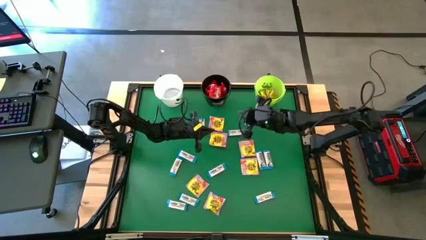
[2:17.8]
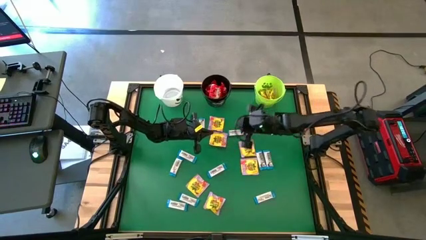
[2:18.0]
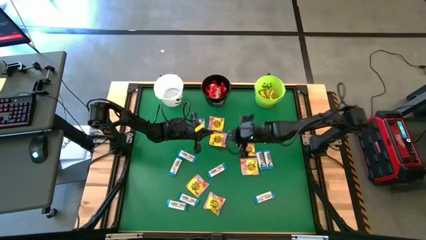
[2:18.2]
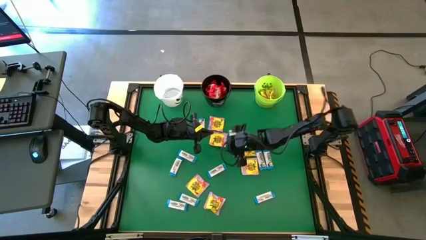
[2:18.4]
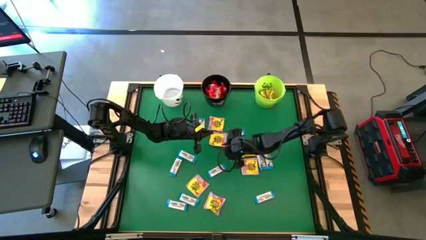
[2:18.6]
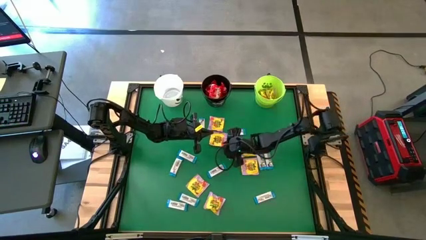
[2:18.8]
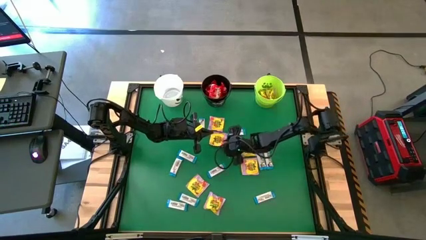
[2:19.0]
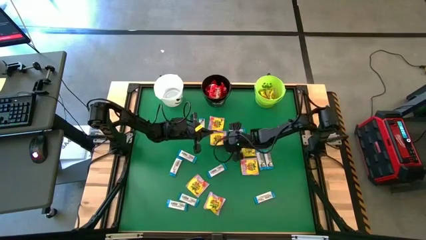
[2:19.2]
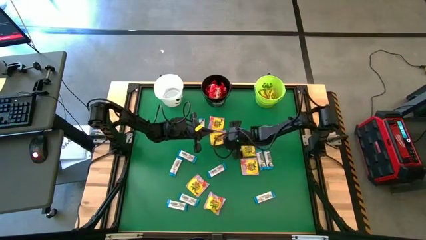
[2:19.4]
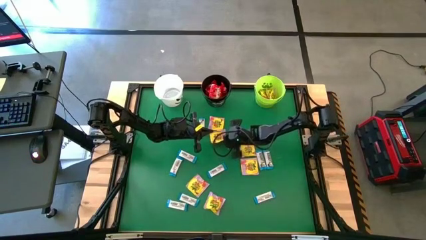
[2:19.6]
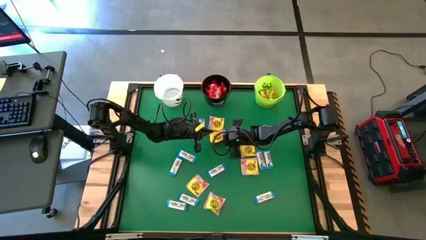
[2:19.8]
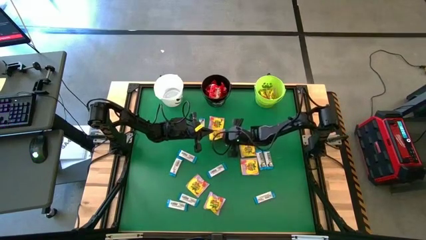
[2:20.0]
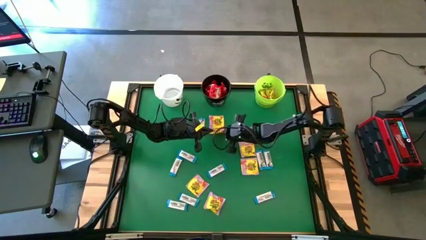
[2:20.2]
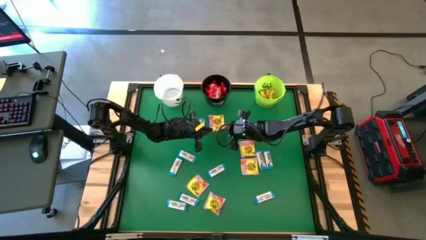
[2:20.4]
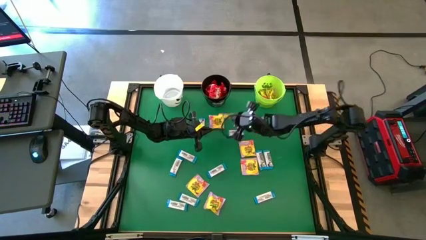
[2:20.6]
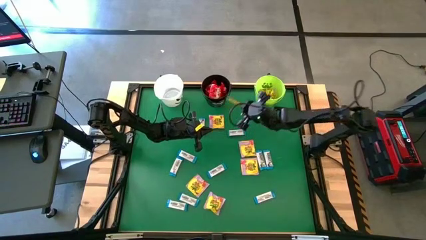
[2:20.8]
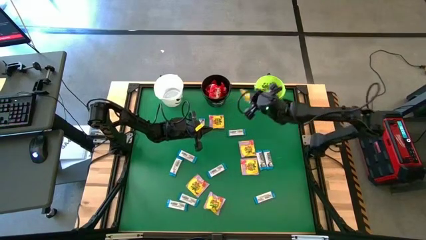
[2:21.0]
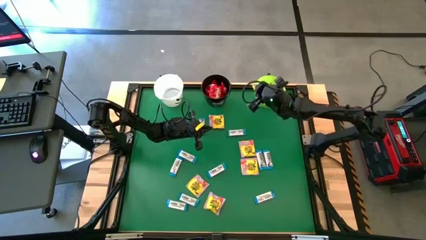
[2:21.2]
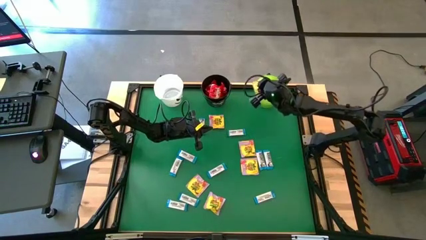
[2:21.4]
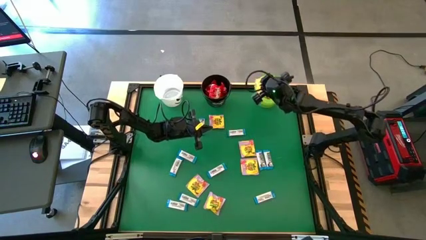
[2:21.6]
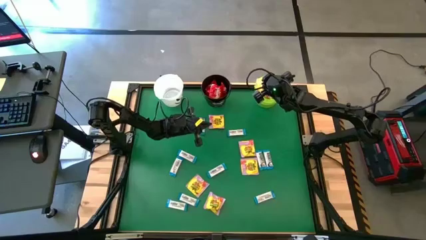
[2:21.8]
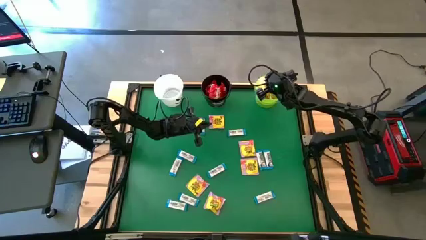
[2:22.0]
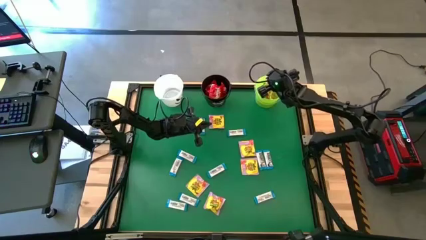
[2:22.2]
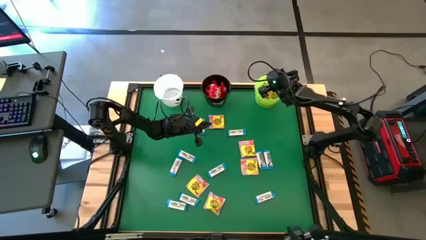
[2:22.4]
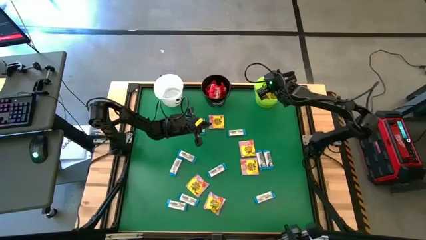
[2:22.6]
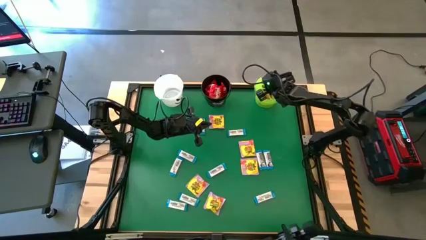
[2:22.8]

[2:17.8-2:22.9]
Task: Sort candy by brand, put in halloween buckets
Put the yellow candy into the green bucket

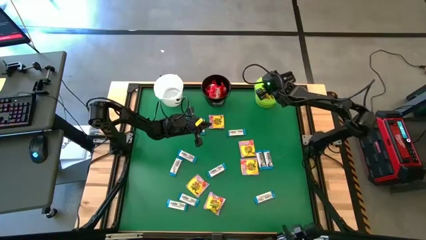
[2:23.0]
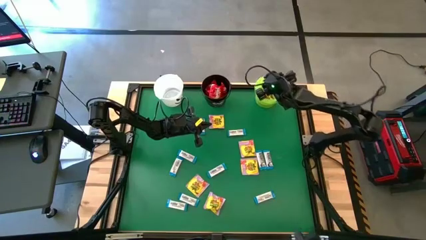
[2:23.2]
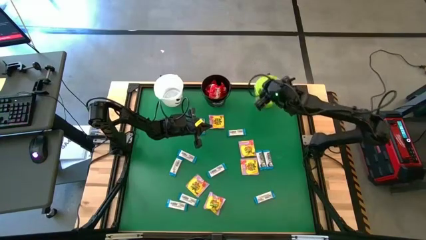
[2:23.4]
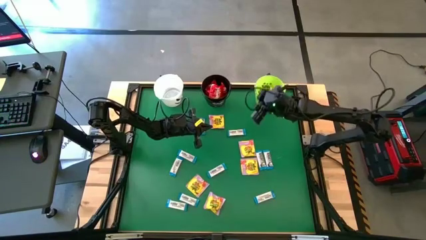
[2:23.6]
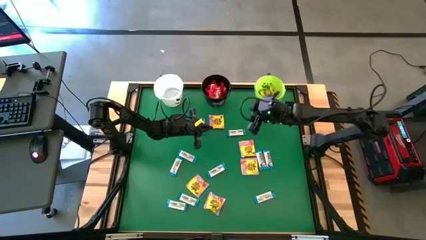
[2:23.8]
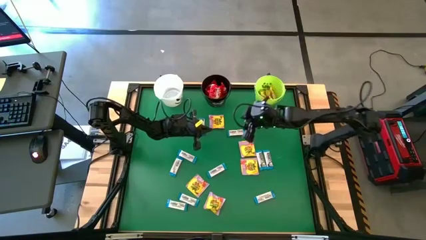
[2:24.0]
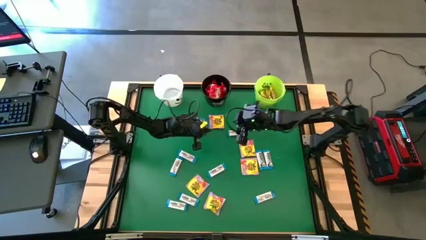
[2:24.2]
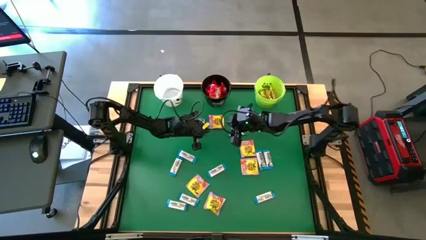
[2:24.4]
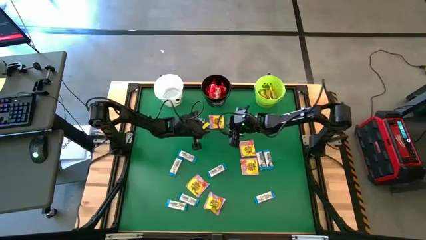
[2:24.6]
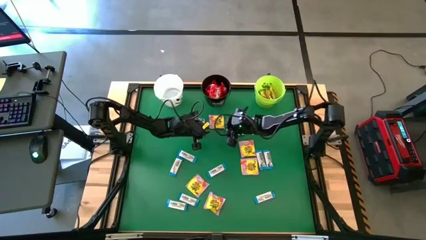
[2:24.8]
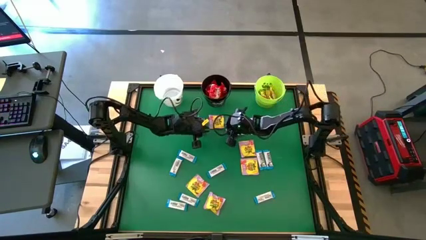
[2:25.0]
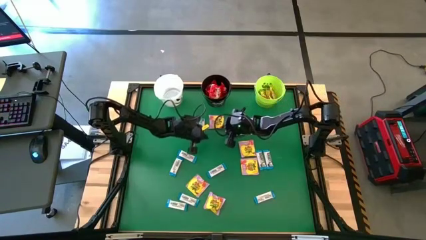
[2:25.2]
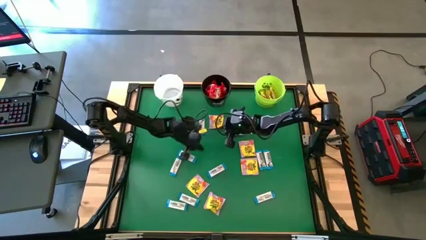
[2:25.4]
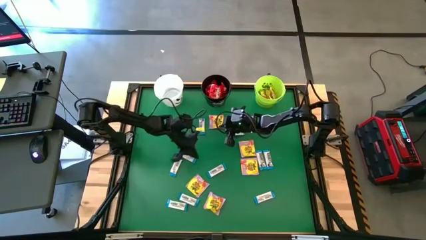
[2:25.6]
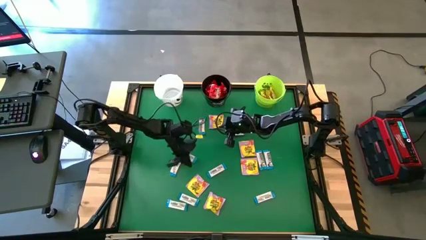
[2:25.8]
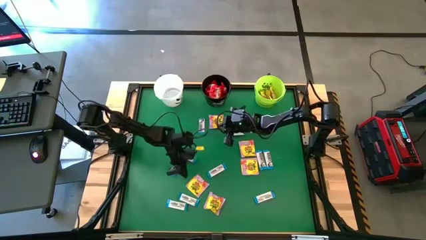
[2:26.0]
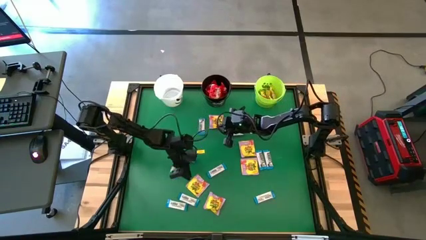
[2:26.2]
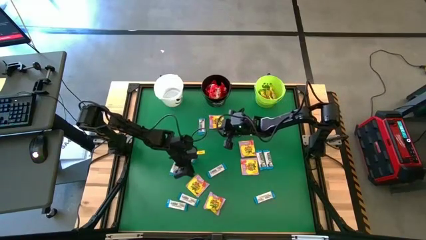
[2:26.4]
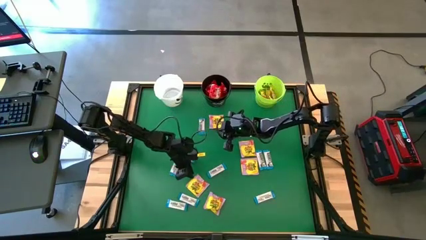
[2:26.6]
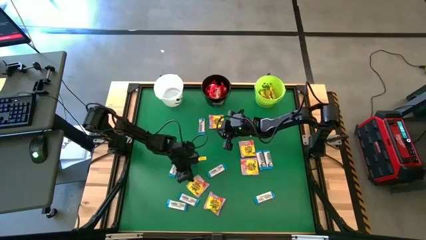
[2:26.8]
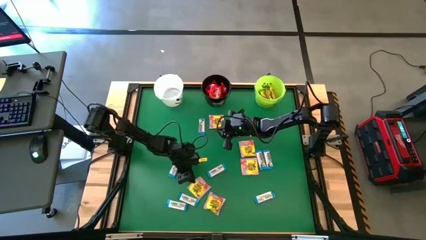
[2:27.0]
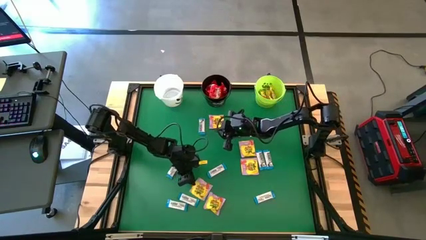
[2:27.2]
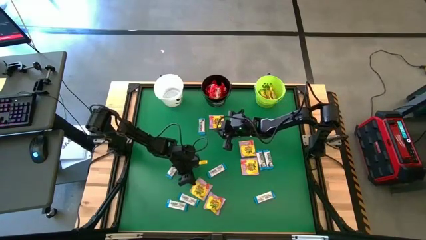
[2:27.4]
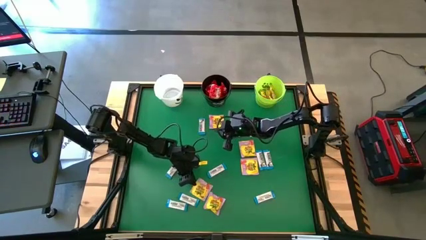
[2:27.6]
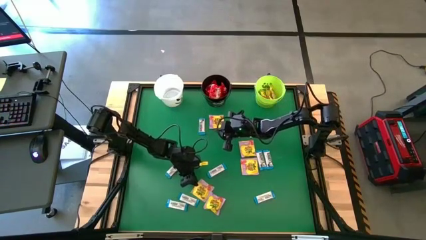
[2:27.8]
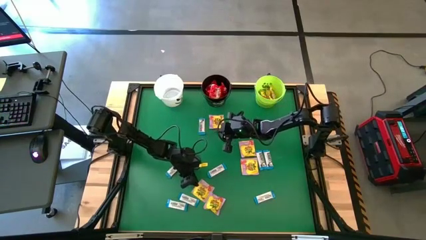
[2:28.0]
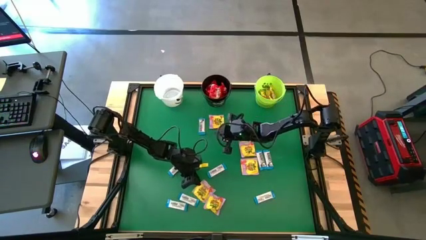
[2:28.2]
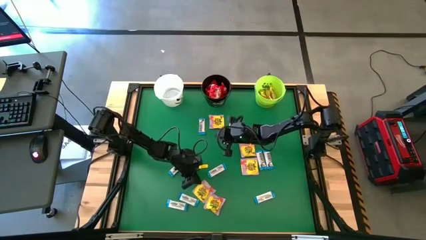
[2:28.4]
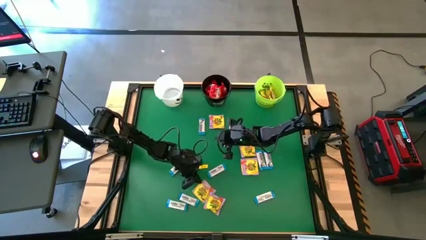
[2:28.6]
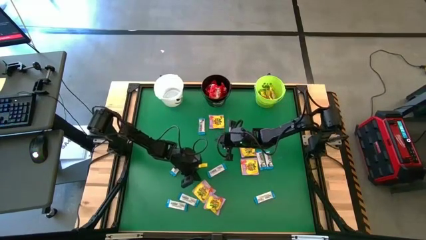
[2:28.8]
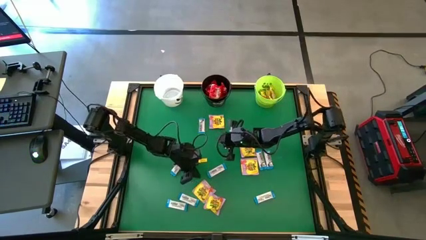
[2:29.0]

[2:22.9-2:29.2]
Put the yellow candy into the green bucket

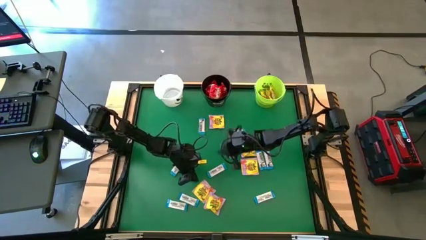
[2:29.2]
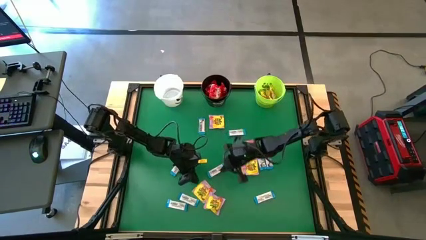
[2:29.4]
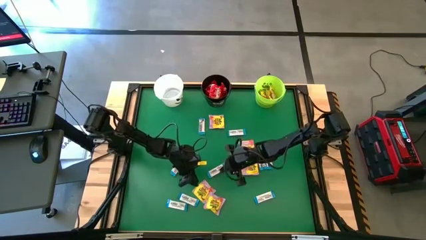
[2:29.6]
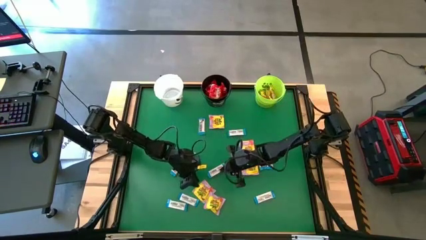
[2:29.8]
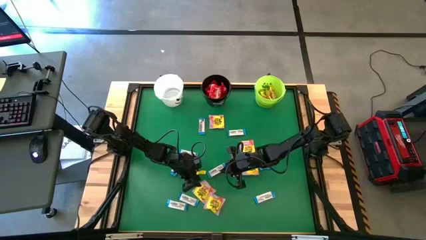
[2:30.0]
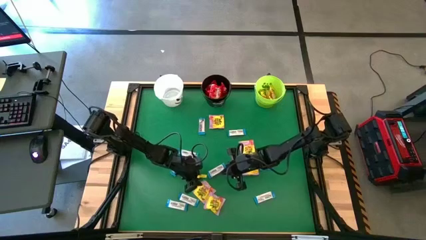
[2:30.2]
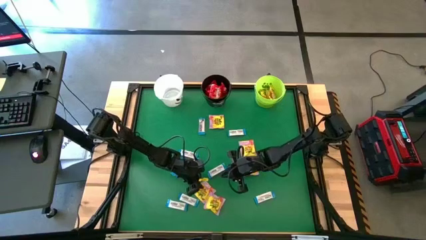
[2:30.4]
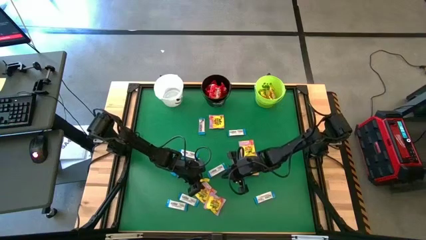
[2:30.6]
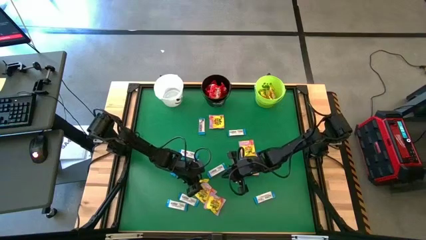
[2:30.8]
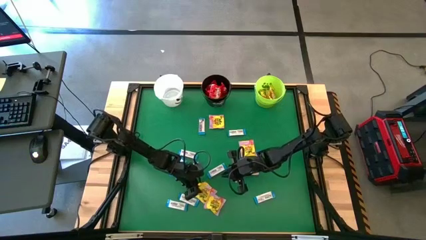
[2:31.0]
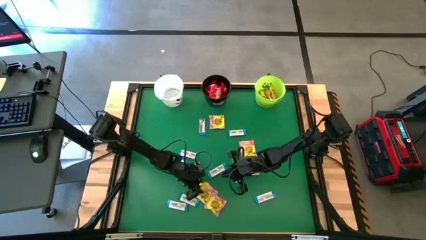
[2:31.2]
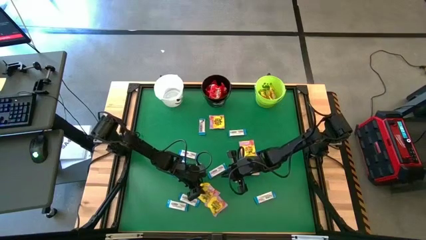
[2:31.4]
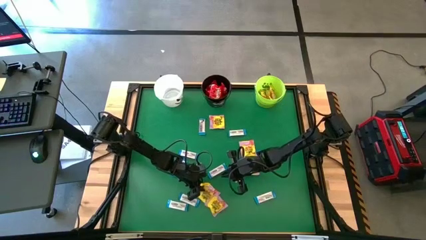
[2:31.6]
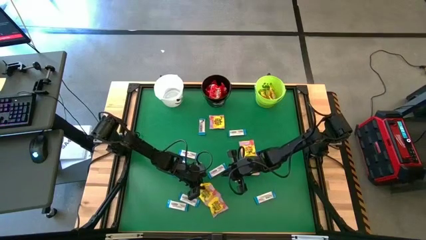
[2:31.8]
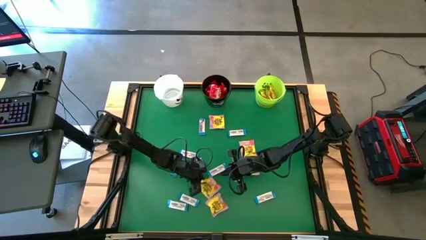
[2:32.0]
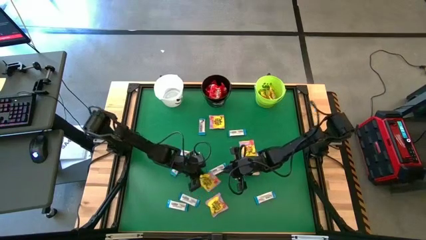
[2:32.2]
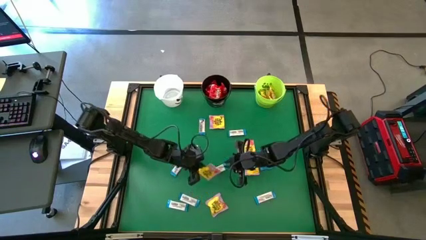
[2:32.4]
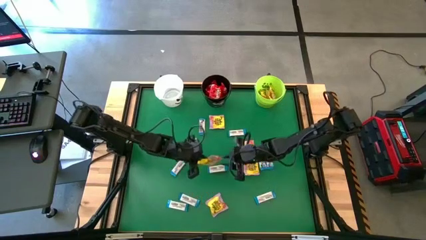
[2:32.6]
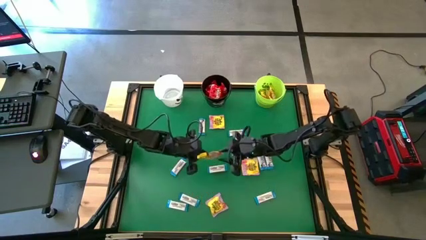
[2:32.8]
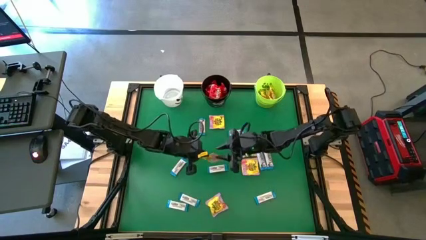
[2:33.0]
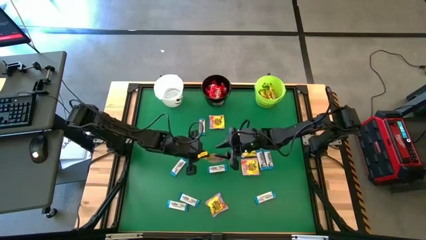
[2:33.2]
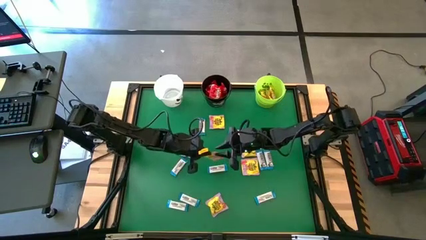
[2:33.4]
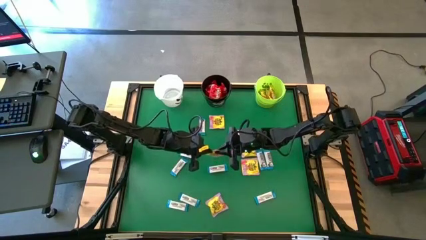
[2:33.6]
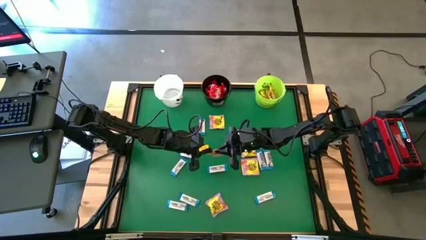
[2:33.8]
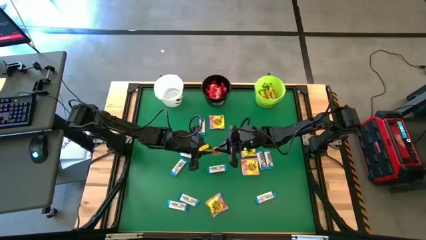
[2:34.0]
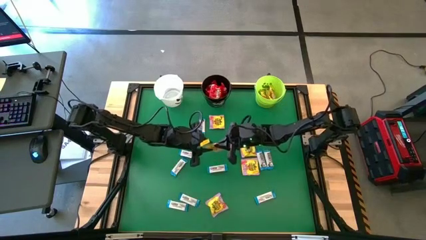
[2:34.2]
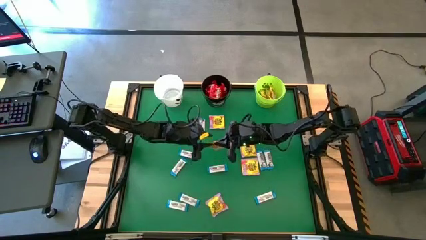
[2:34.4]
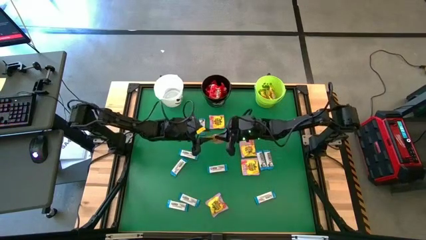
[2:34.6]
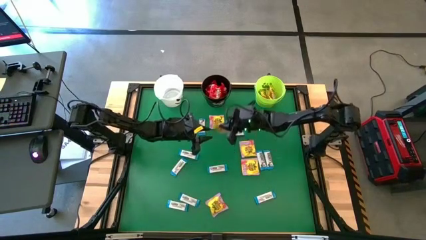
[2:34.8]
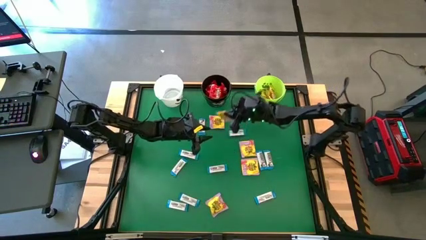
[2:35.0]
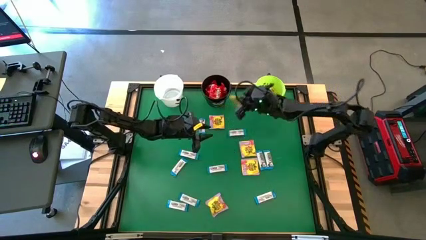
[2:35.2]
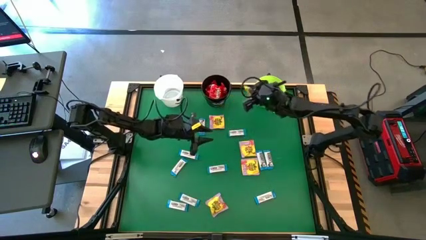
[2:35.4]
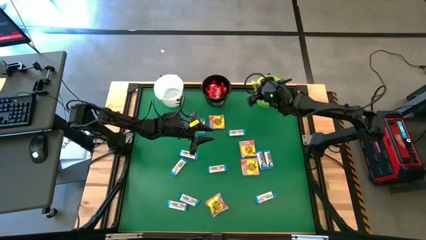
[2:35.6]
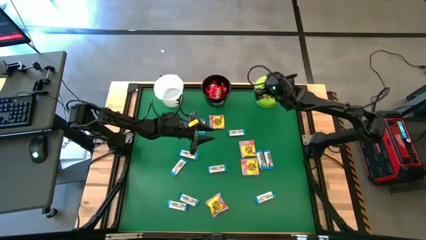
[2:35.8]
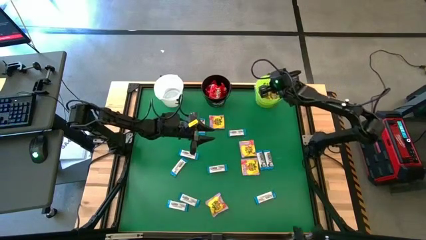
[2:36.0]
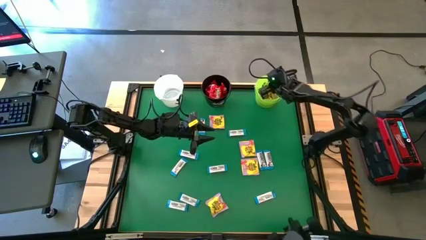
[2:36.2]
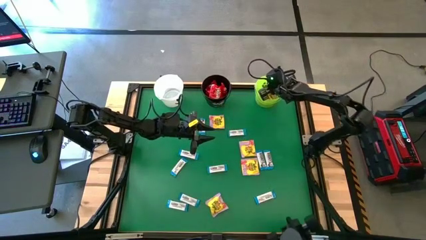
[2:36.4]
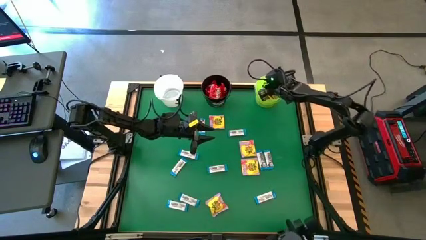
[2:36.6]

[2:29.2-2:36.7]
Put the yellow candy into the green bucket
